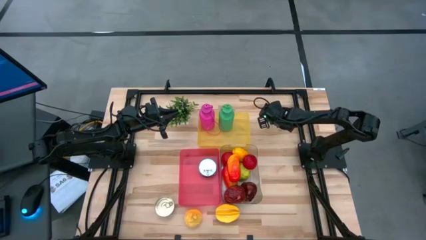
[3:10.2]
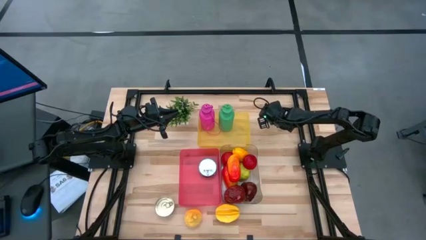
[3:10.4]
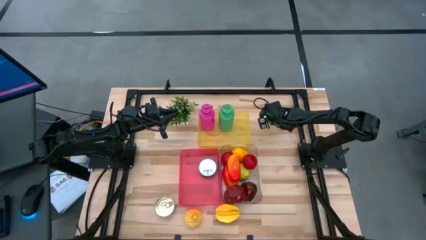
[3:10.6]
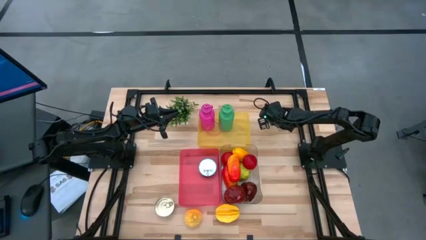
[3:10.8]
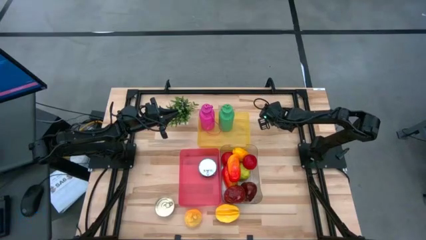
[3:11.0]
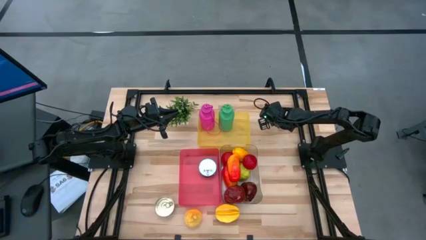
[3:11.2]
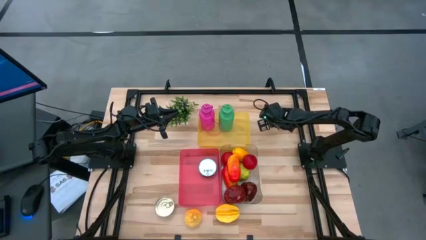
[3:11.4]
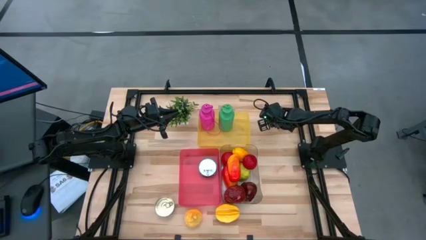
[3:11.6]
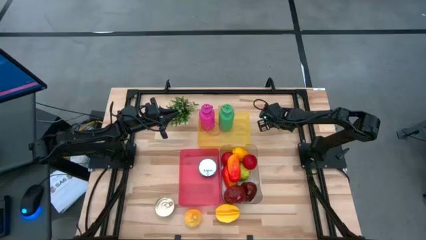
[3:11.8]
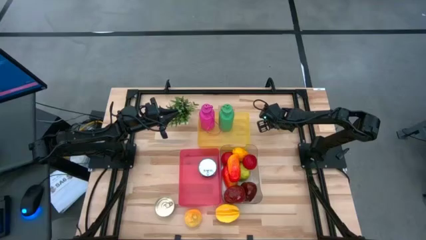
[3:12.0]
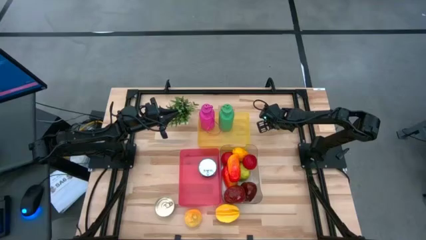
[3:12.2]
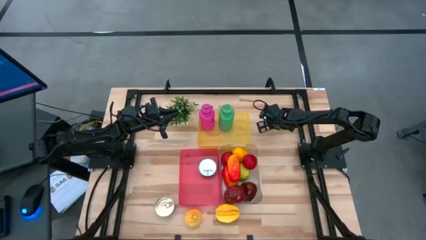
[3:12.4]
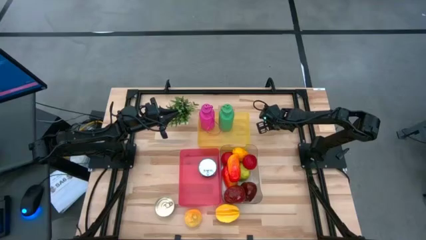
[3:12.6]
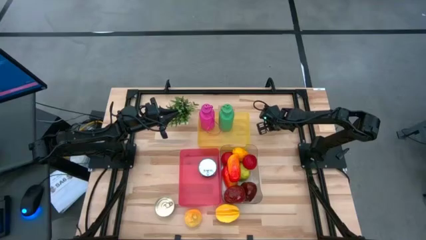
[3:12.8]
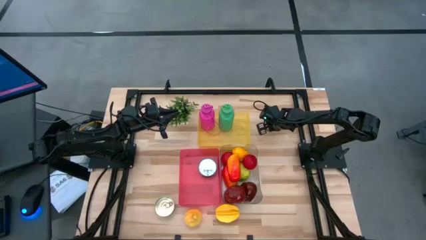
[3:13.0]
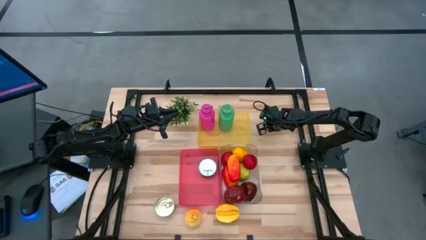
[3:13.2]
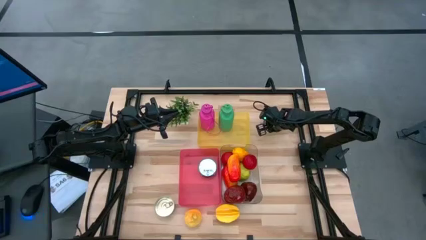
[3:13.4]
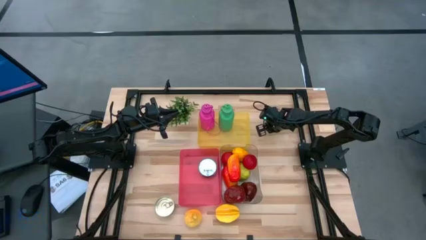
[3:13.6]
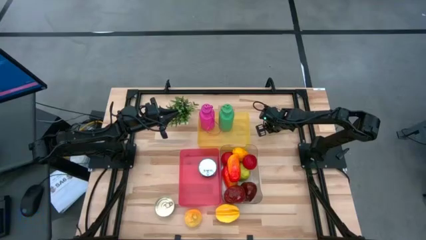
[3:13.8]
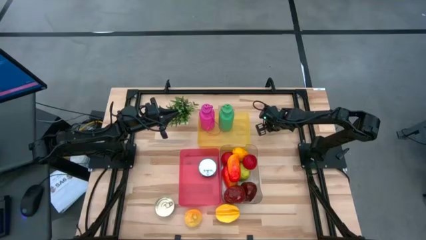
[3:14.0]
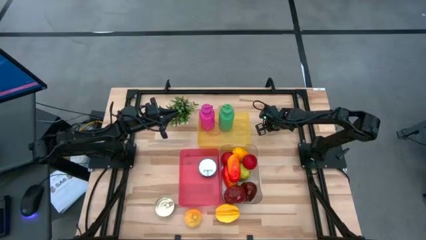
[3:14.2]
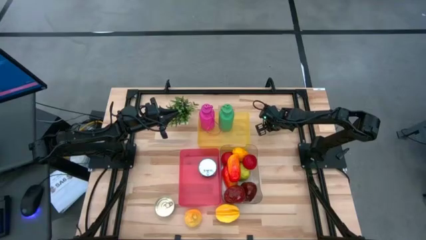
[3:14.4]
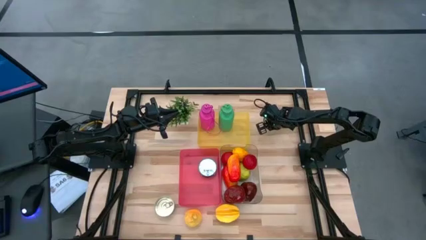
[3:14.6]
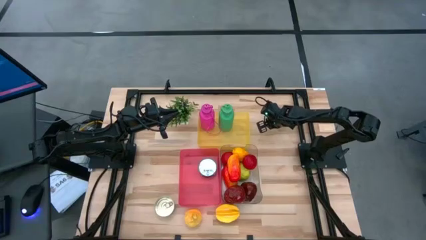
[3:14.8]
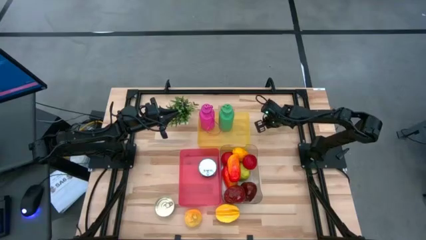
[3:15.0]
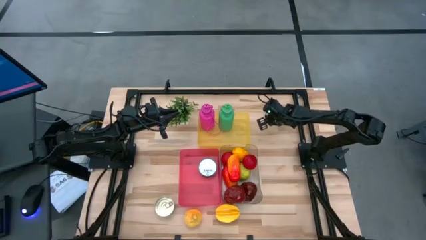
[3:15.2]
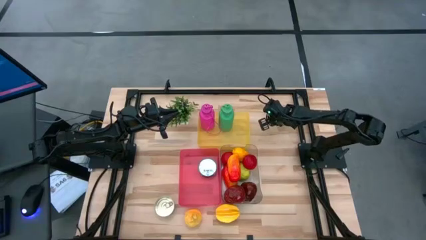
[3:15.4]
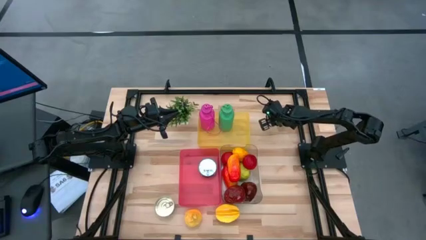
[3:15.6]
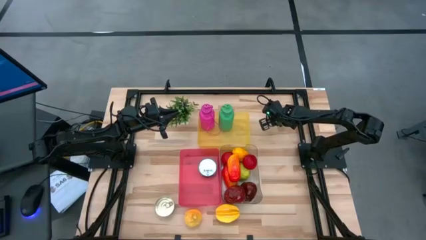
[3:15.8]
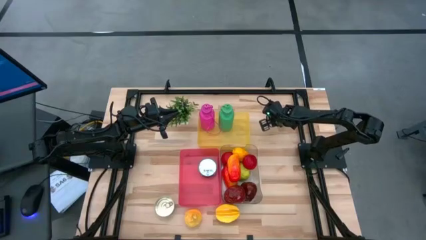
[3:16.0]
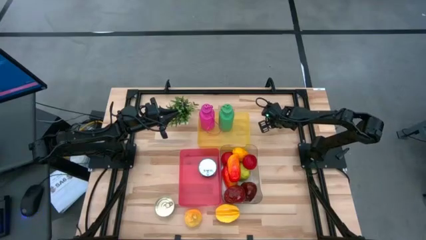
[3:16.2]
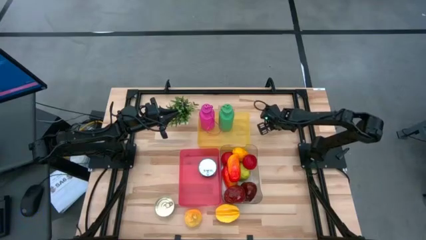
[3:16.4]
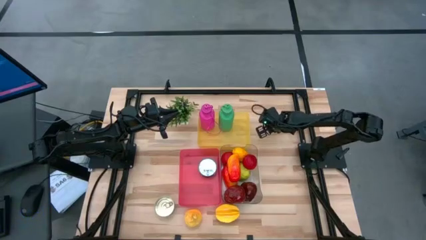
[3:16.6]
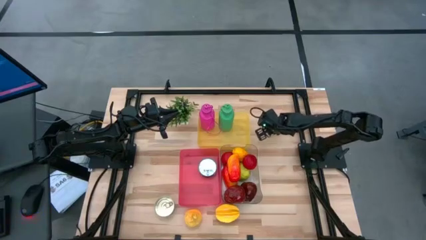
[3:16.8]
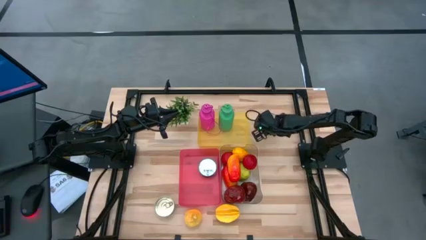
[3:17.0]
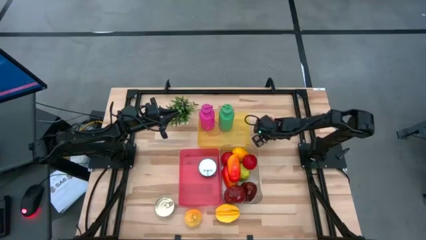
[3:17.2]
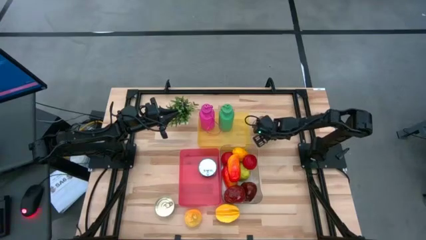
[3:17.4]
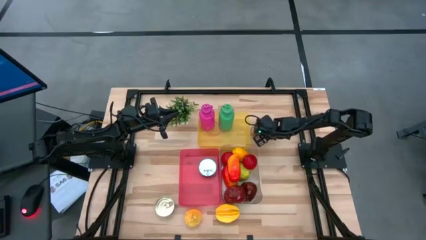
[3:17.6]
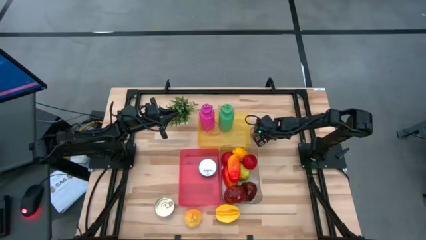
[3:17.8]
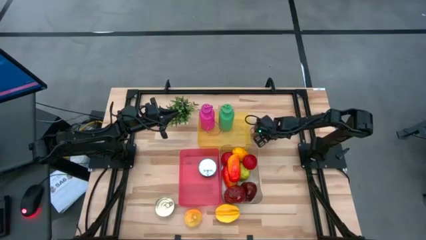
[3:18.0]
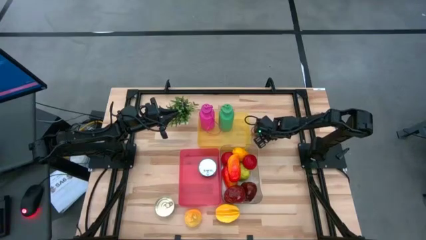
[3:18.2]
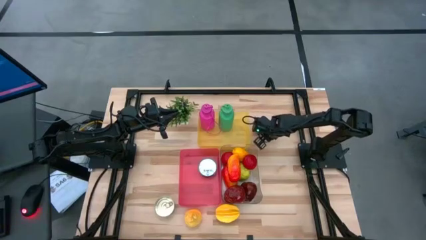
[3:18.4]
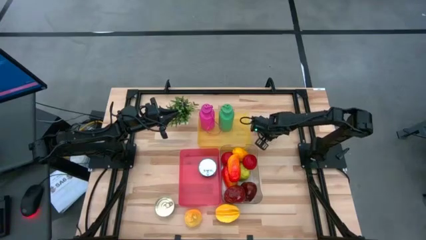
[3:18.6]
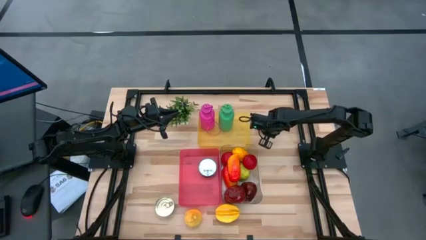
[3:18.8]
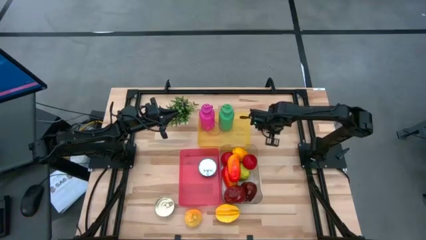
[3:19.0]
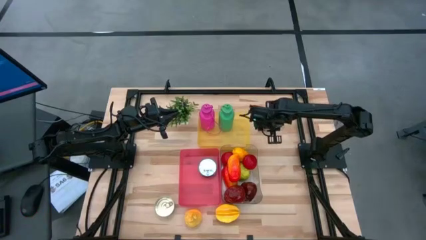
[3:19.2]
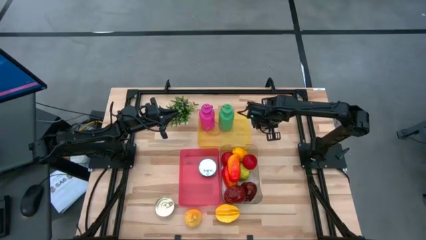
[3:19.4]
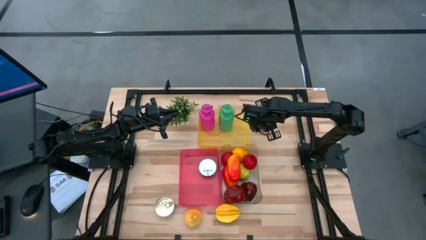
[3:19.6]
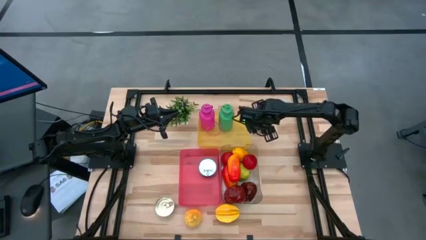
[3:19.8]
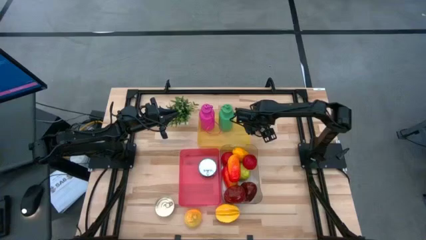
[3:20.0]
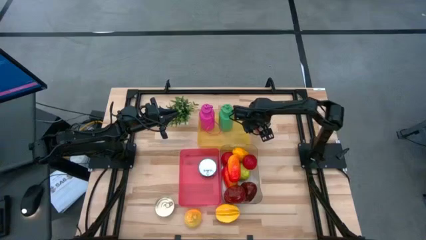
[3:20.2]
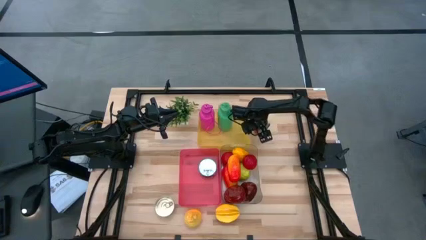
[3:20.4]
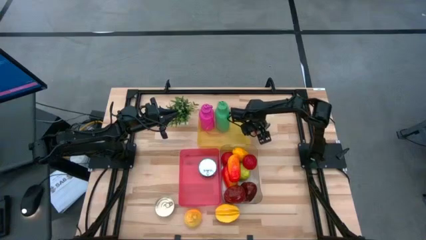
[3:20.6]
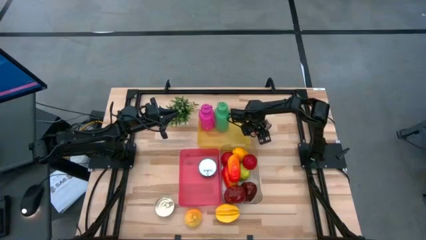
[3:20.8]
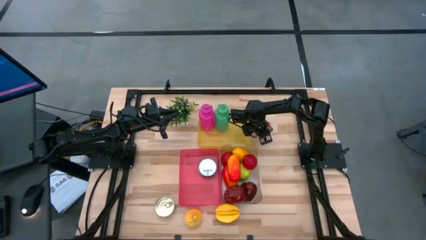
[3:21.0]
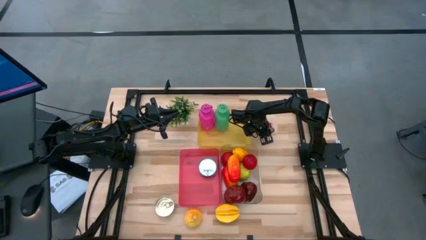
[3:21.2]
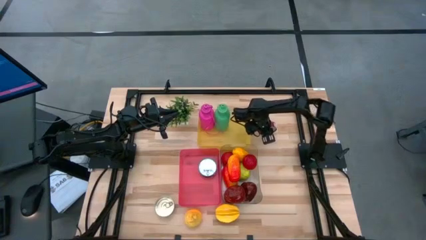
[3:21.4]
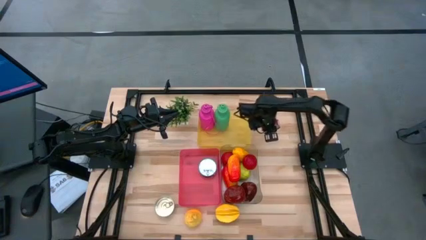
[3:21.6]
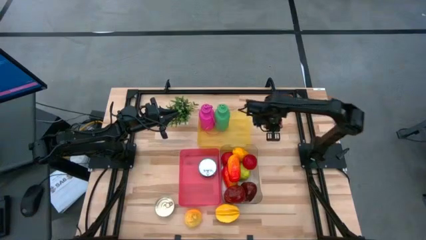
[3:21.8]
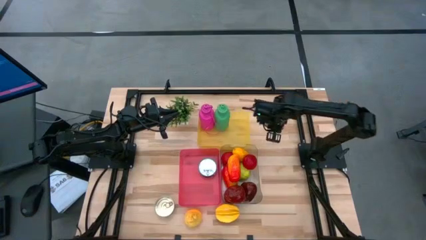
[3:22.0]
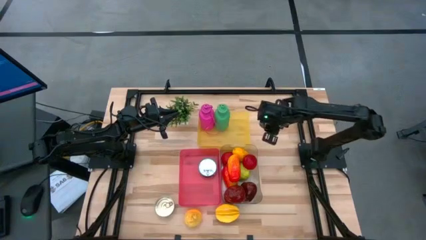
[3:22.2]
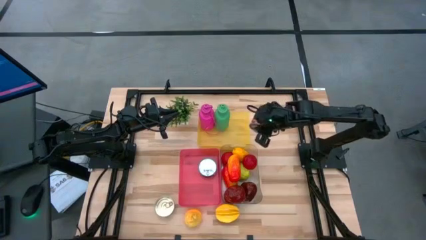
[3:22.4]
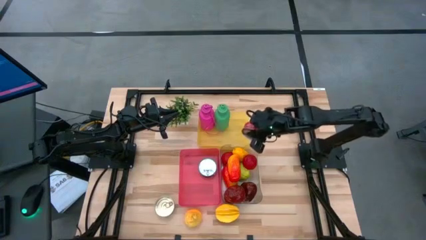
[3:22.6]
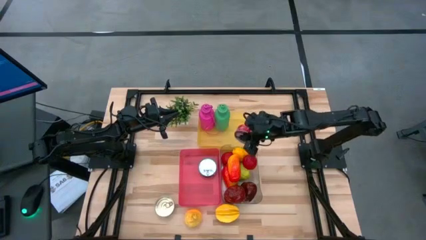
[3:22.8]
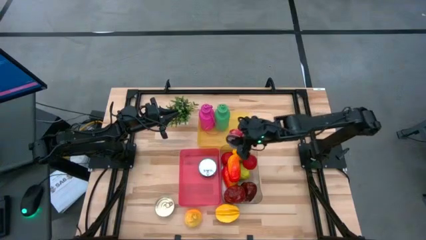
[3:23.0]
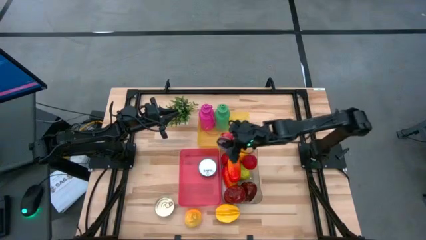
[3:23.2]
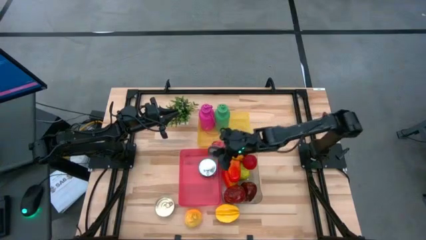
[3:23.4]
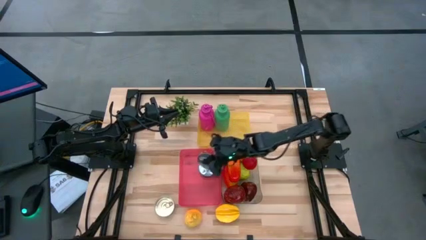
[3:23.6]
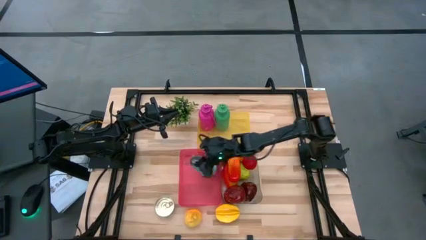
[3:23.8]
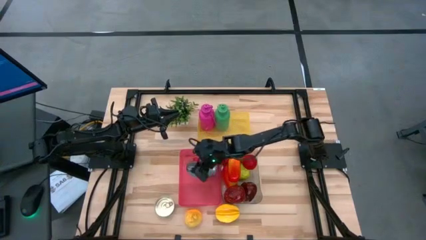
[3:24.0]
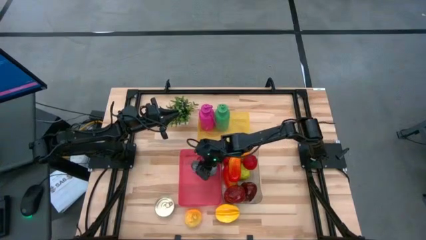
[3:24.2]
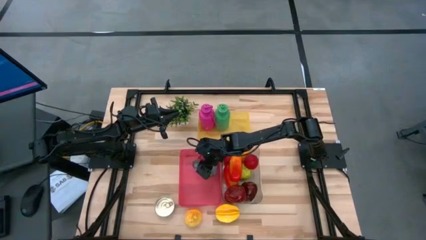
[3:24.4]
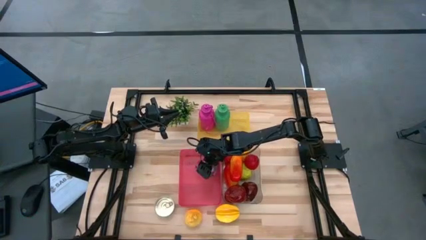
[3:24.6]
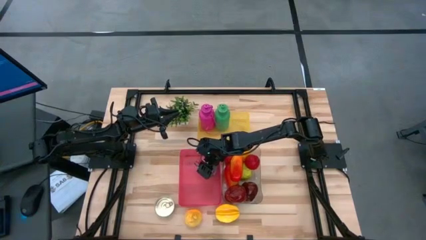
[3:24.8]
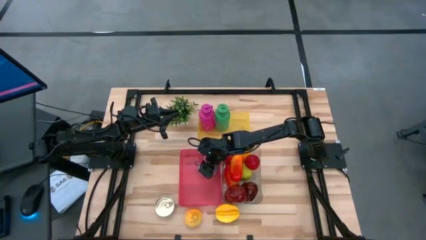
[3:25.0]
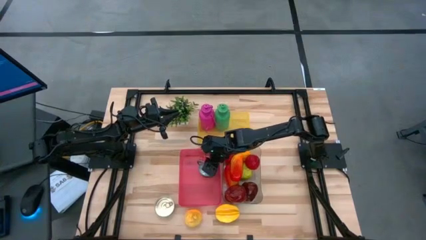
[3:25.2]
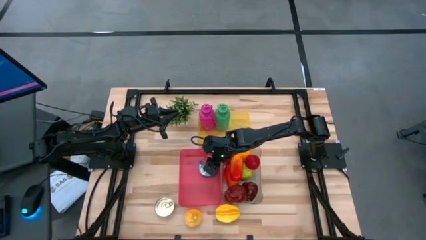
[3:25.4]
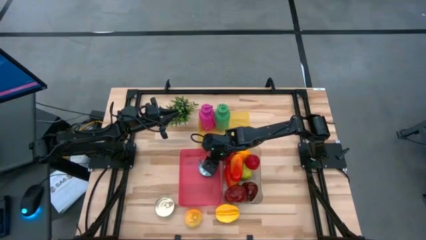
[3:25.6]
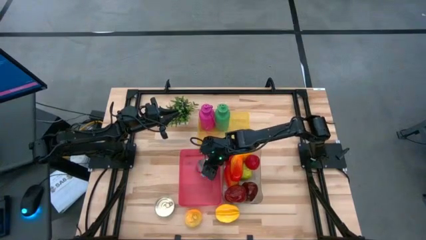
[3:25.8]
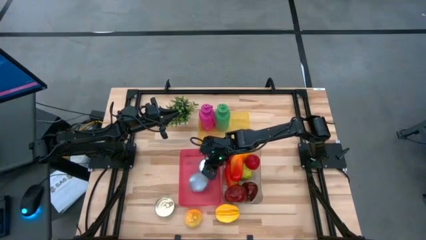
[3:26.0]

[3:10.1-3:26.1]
Task: Pick & Place Food Item
Put the red tuna can into the red bin
